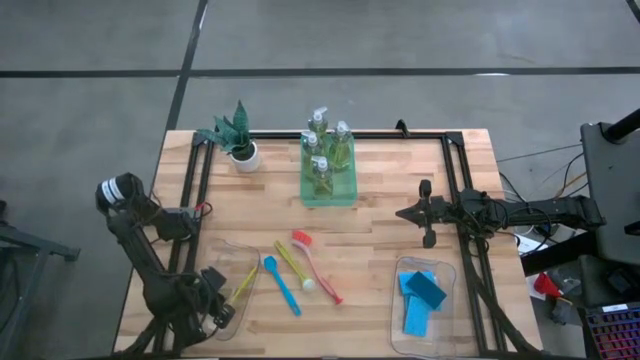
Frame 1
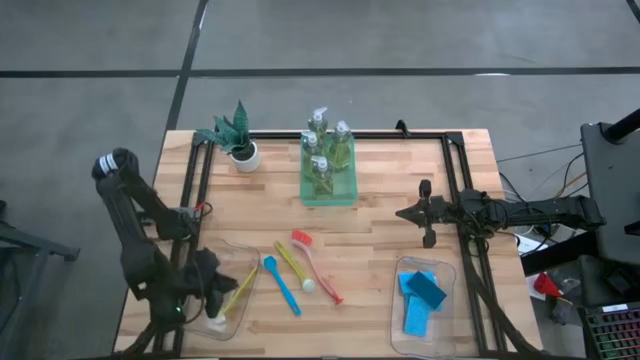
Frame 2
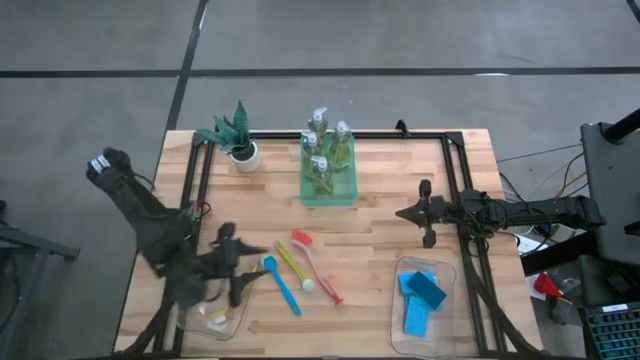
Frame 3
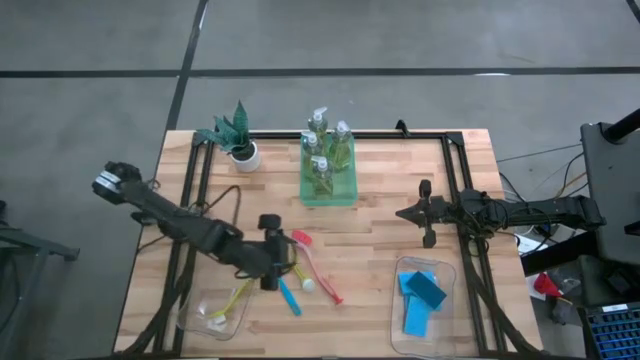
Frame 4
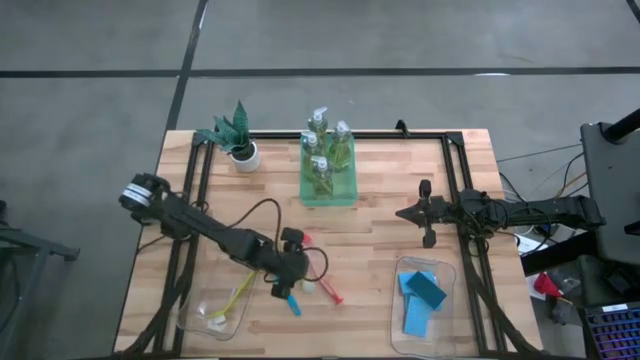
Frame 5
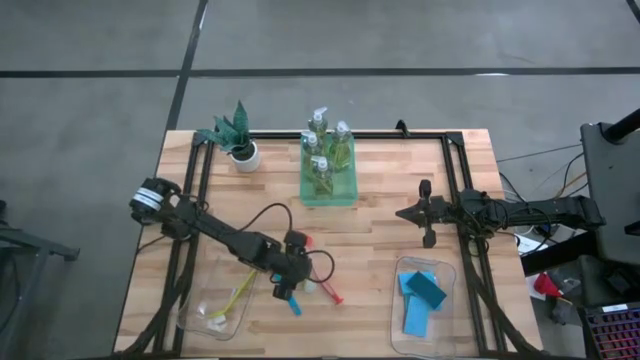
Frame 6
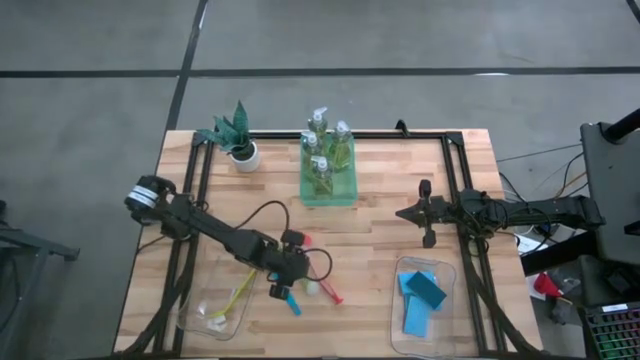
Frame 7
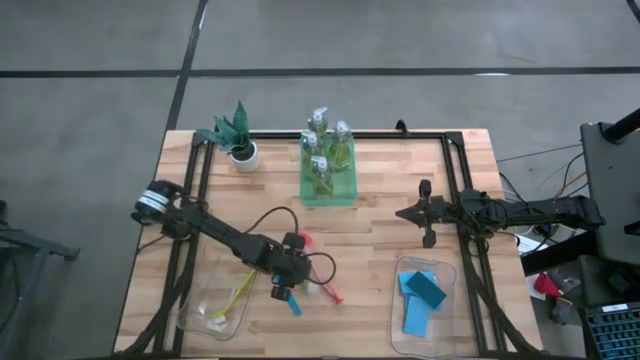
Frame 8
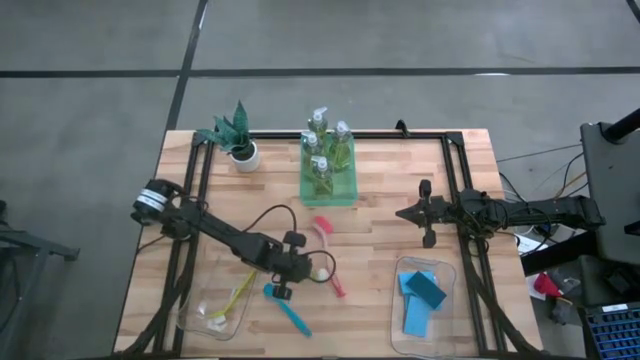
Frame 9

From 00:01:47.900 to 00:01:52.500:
Task: Pick & Place Kitchen Sink Supplies
Put the green toilet brush into the left transparent bin

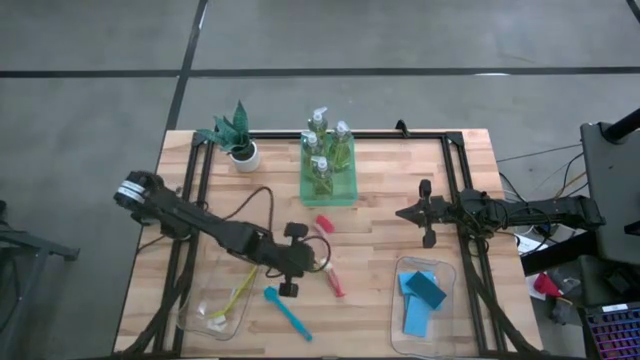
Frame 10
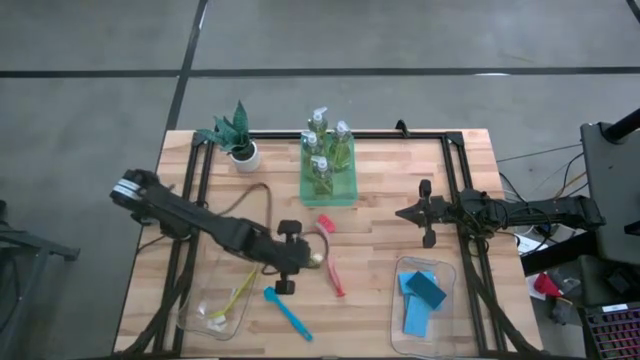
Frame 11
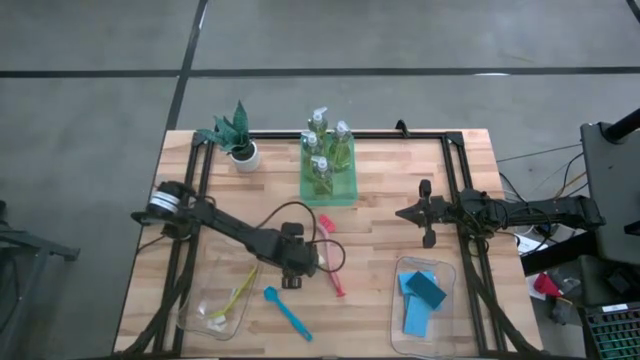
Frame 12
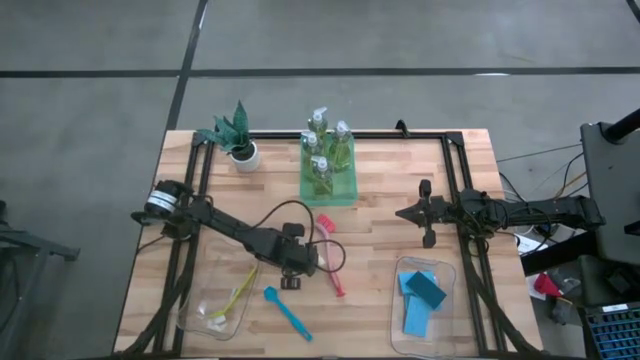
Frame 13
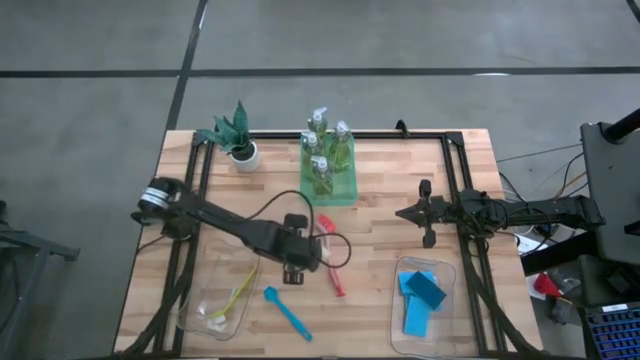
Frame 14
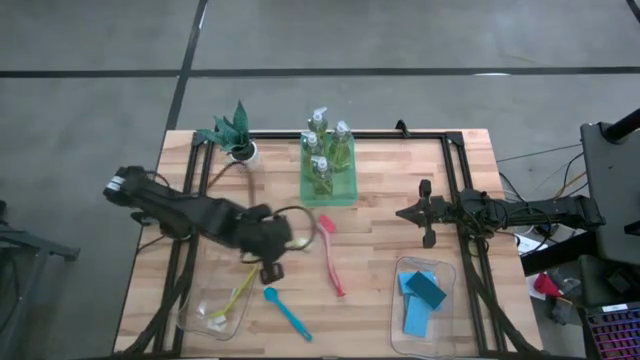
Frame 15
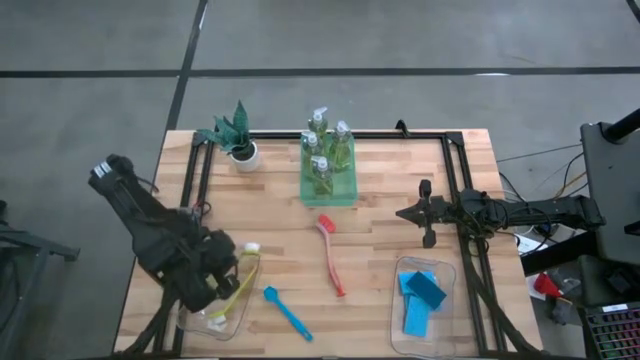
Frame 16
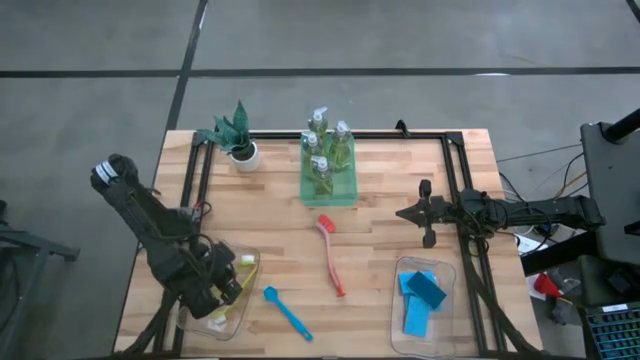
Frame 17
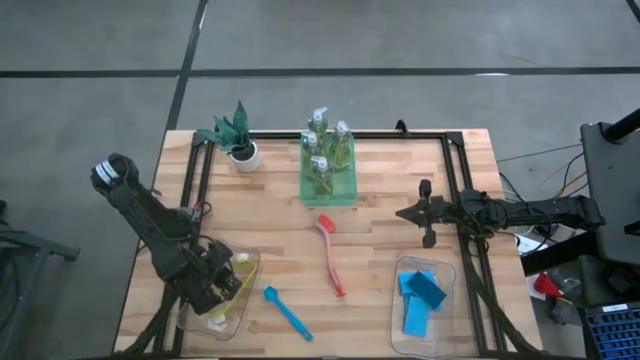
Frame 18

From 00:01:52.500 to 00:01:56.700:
Put the green toilet brush into the left transparent bin

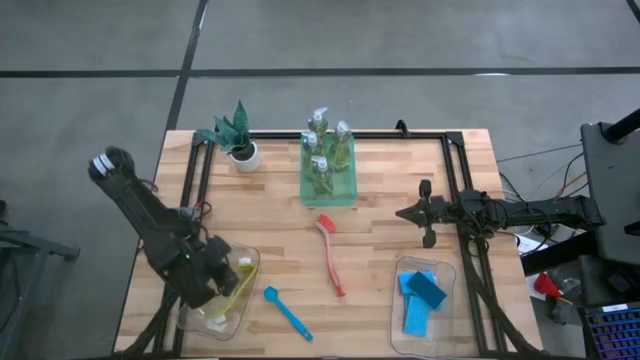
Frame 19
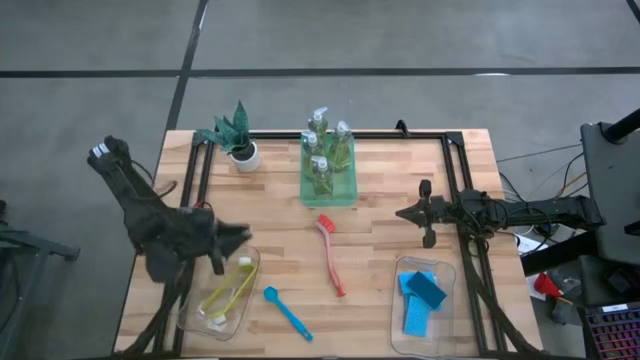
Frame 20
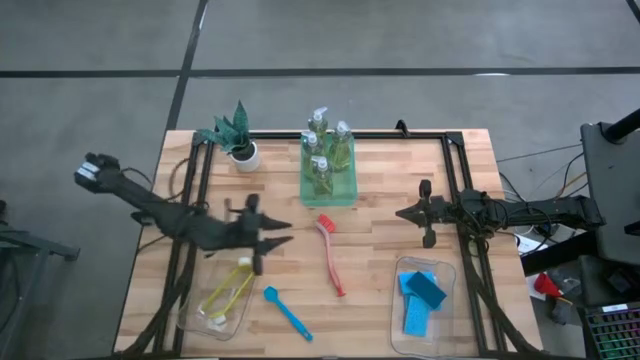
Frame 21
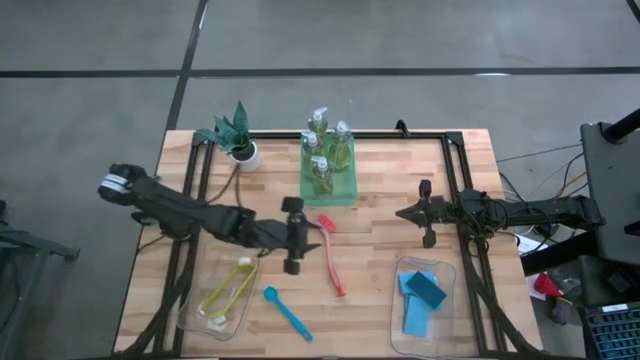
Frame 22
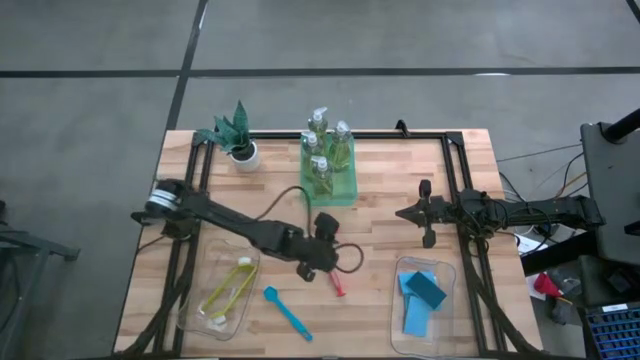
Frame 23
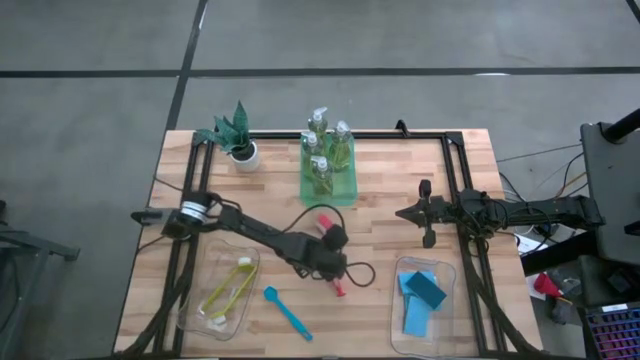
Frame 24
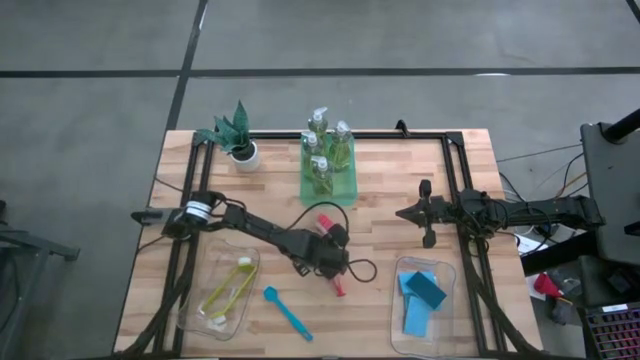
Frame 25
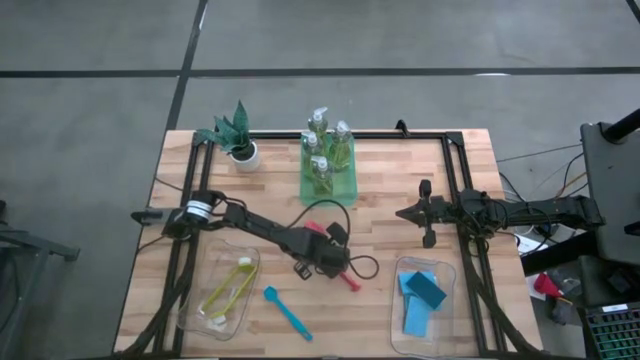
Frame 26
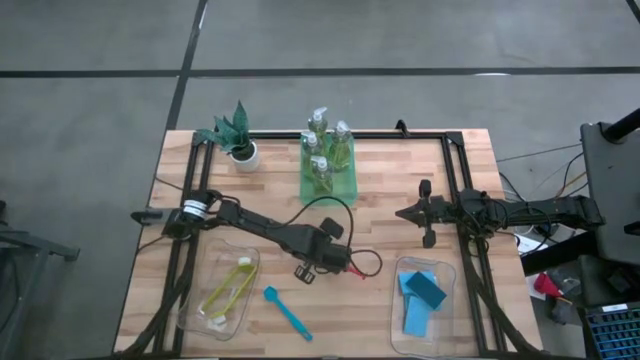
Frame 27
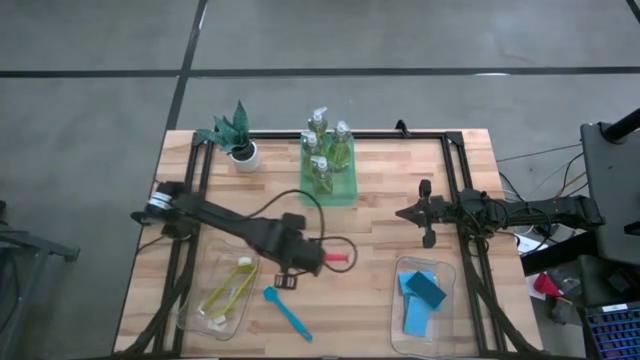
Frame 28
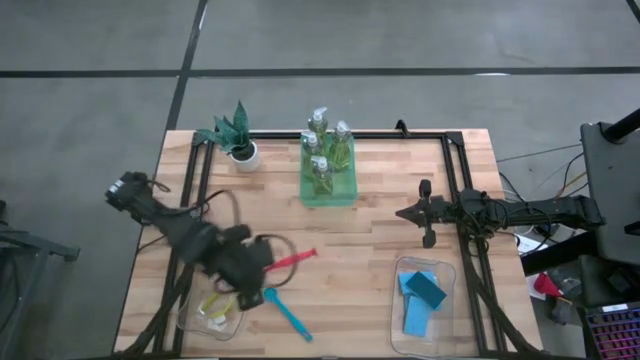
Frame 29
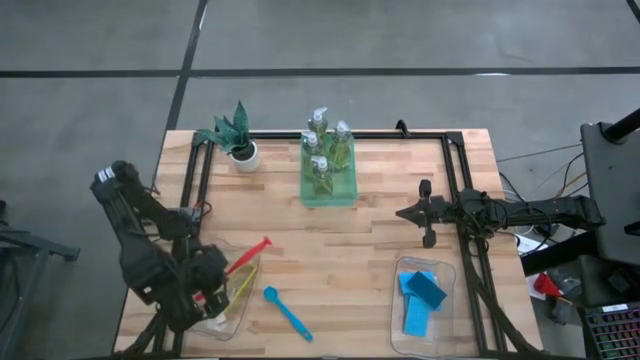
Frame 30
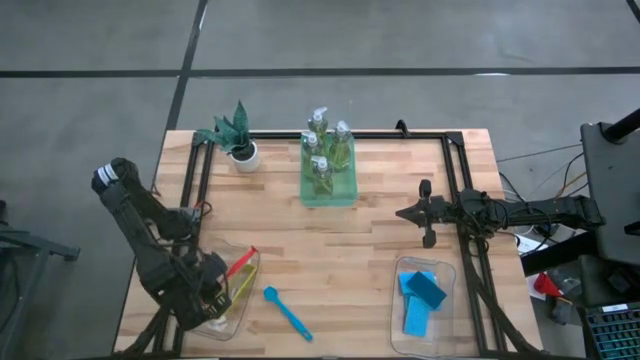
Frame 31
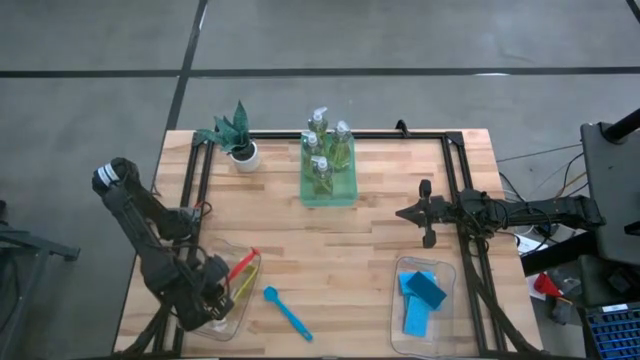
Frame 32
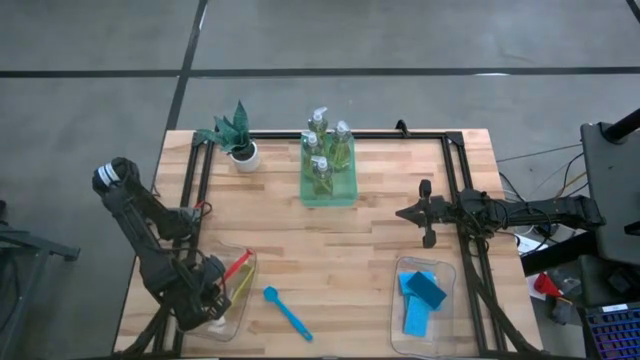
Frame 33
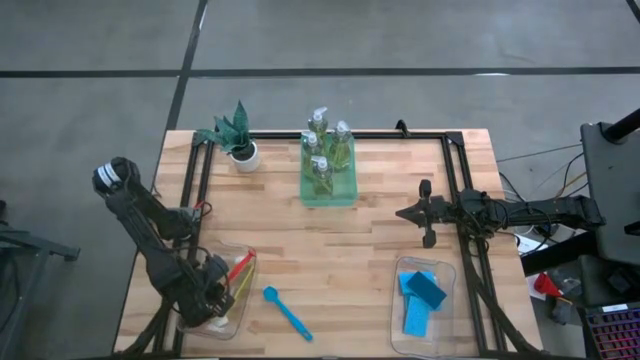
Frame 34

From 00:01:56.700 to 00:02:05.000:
Put the red toilet brush into the left transparent bin

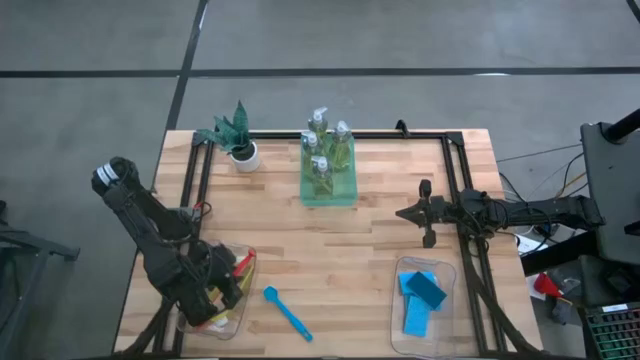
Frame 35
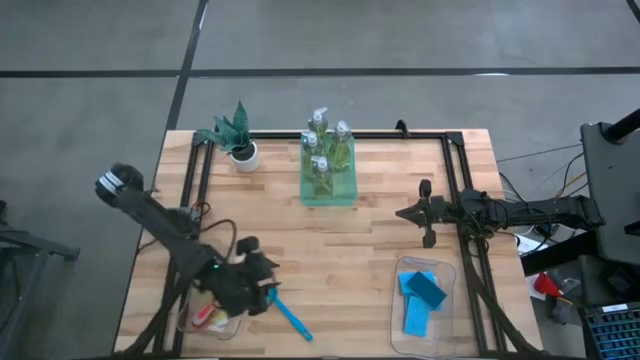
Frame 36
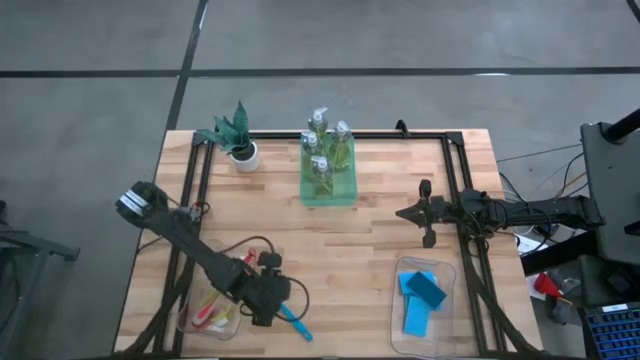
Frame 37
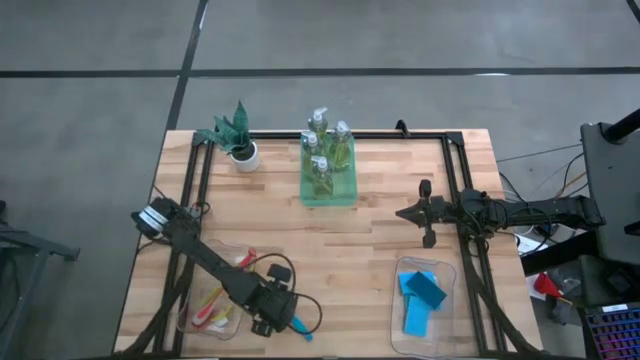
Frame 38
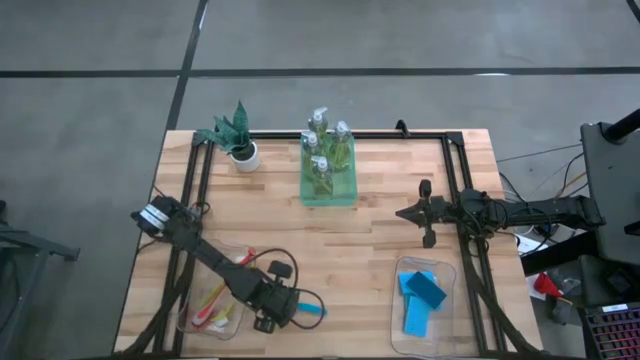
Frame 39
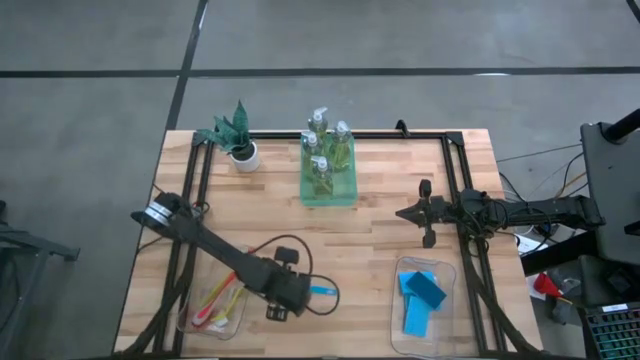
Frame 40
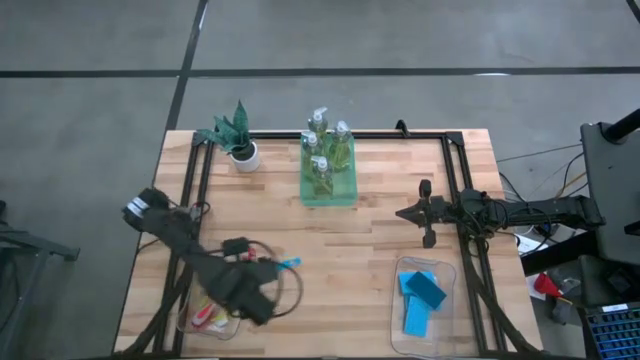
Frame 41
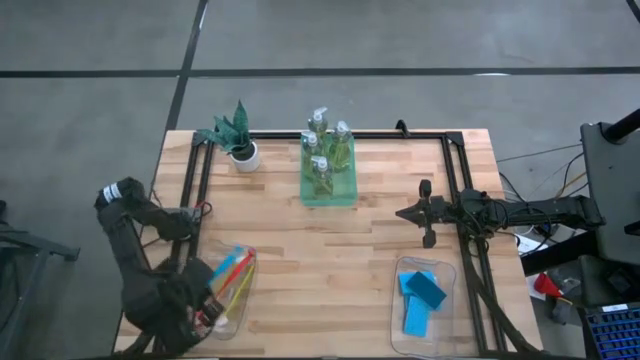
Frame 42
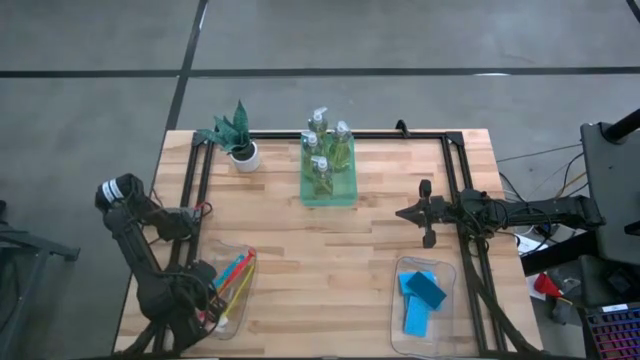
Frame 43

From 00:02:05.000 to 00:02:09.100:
Put the blue toilet brush into the left transparent bin

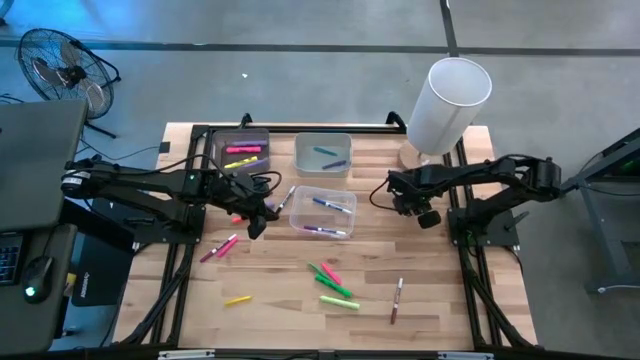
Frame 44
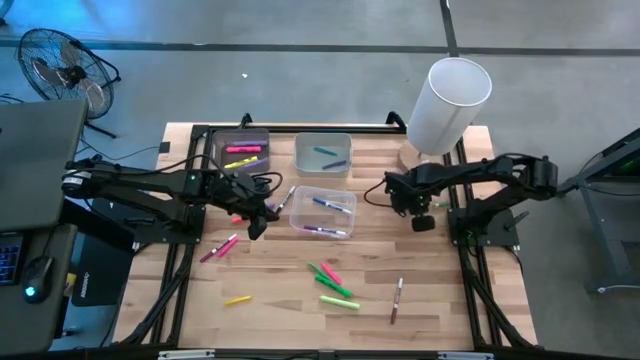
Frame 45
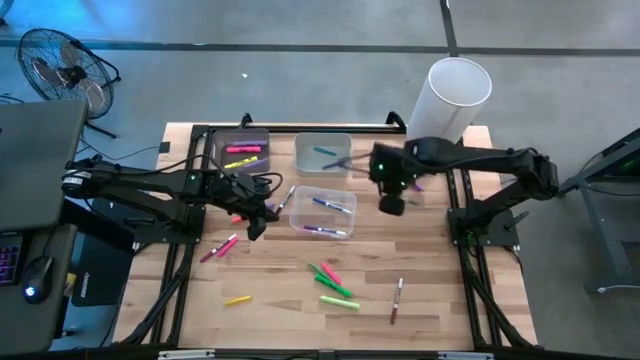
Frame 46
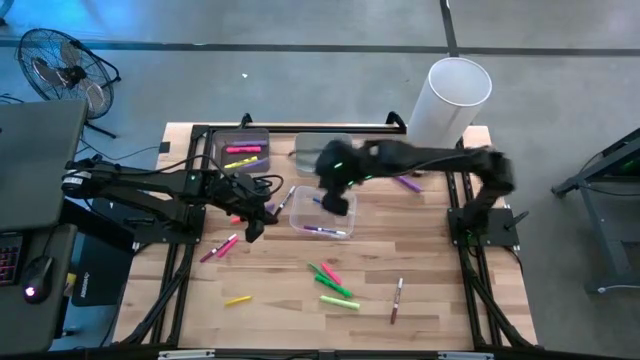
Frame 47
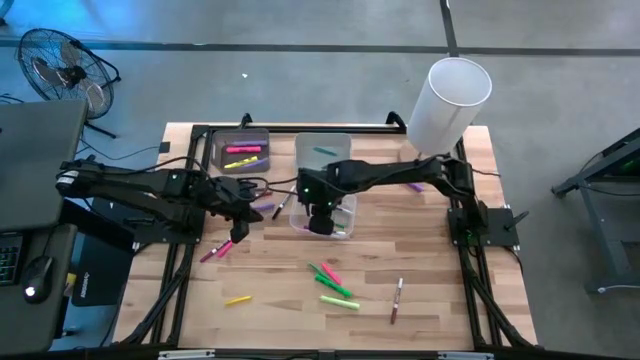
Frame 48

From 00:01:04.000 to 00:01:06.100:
Task: Pick & Place Markers
Put the green marker into the white bin
